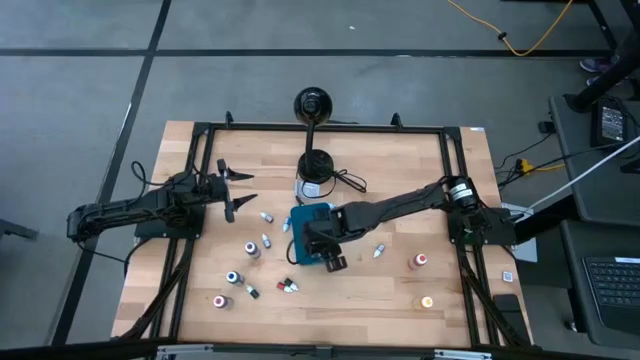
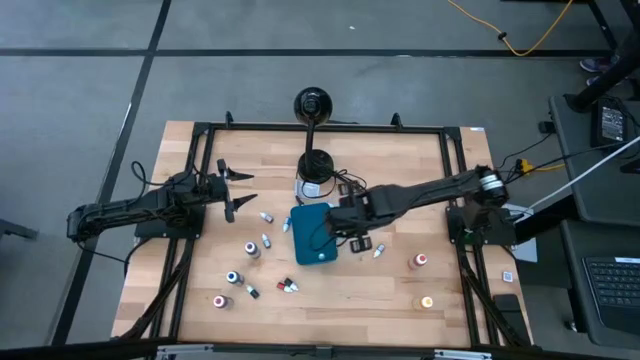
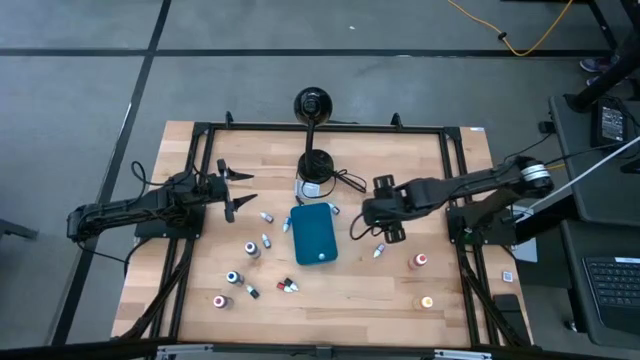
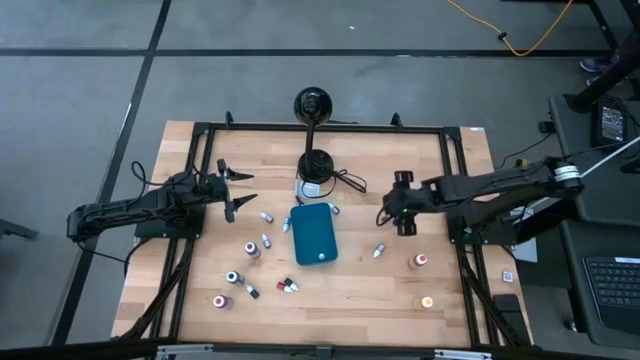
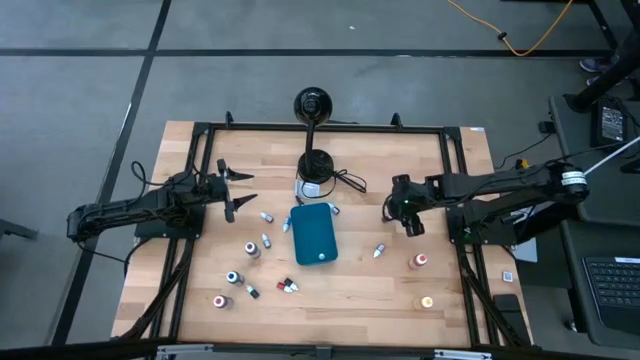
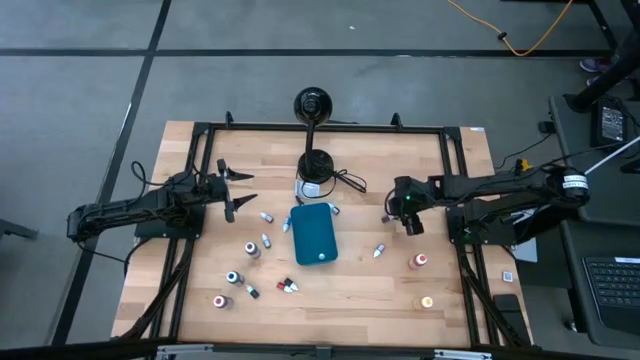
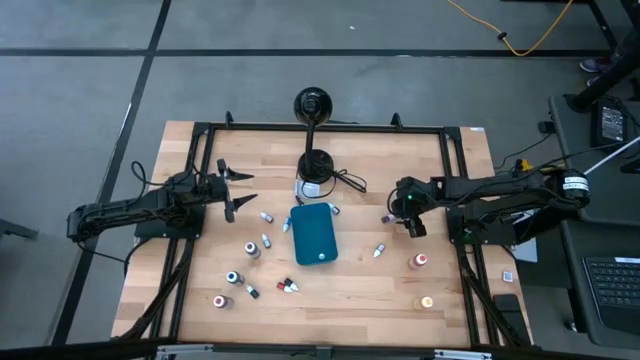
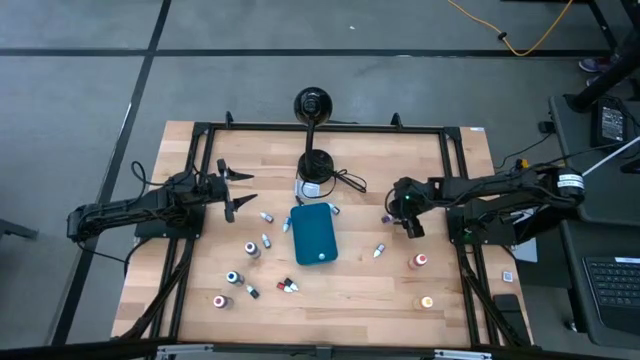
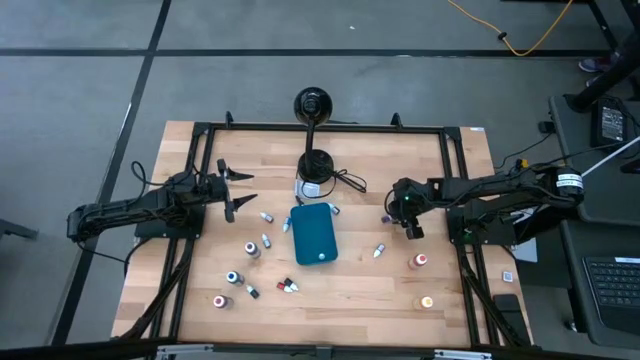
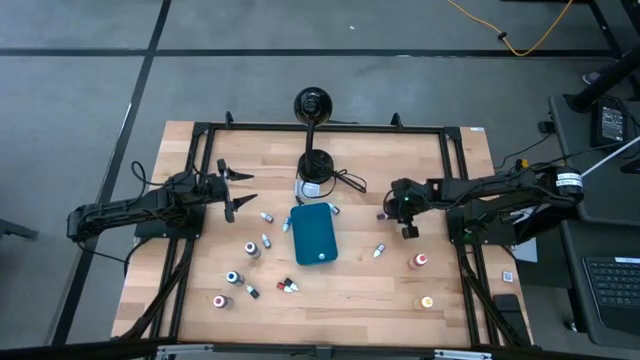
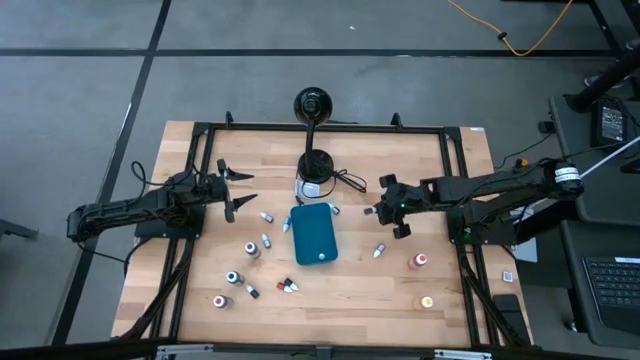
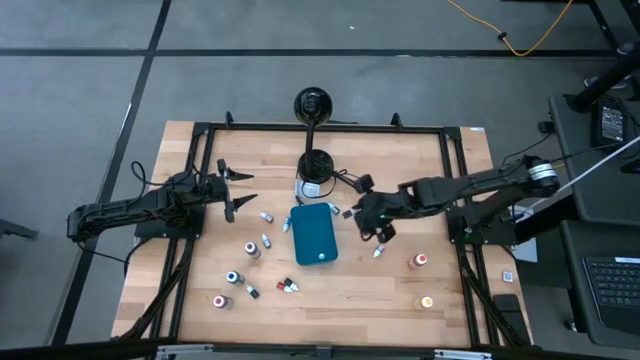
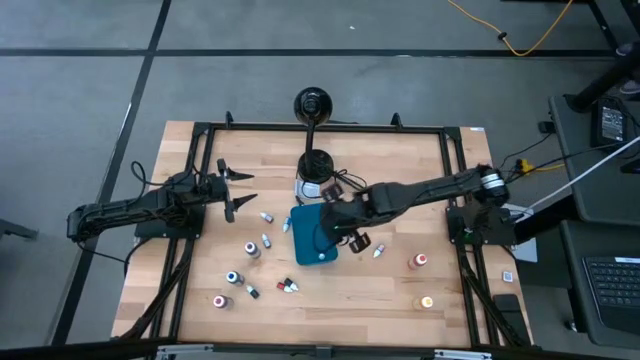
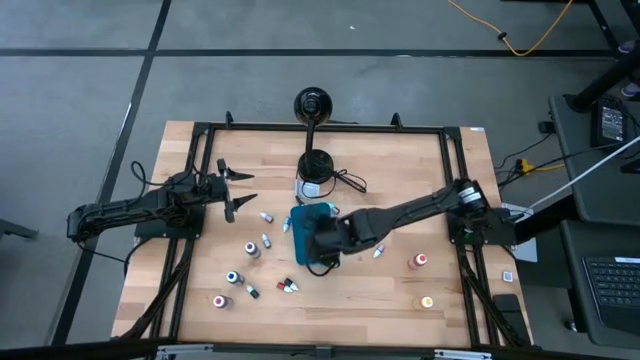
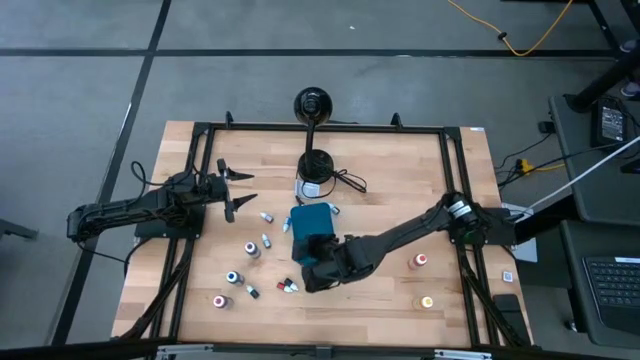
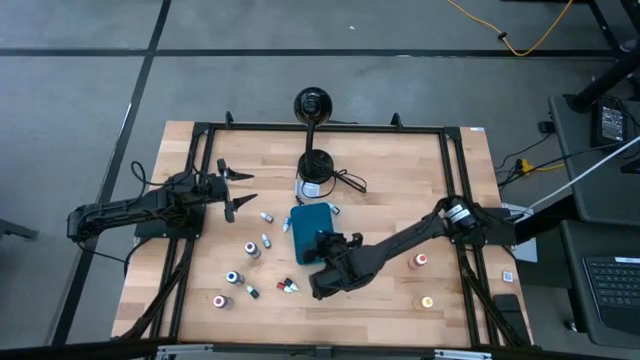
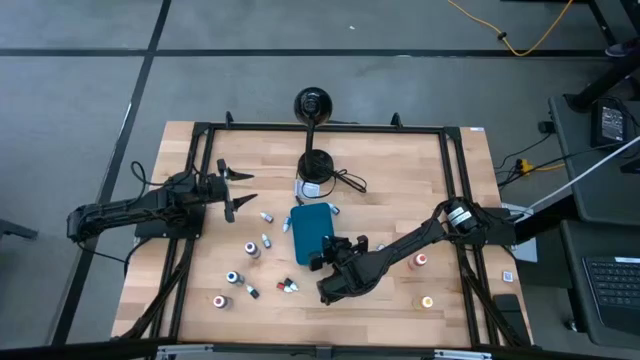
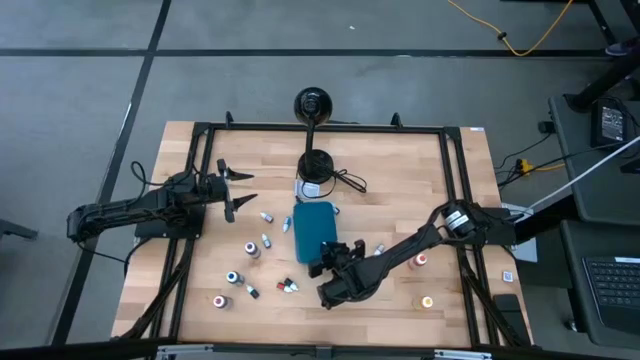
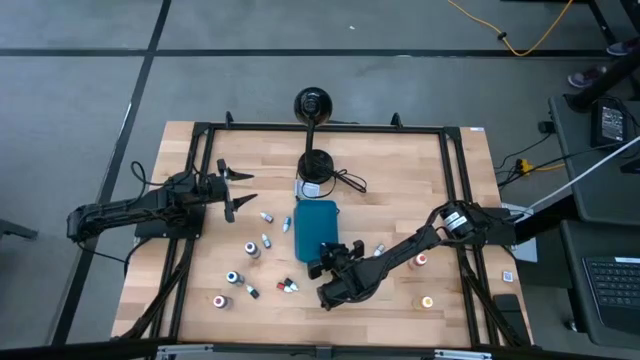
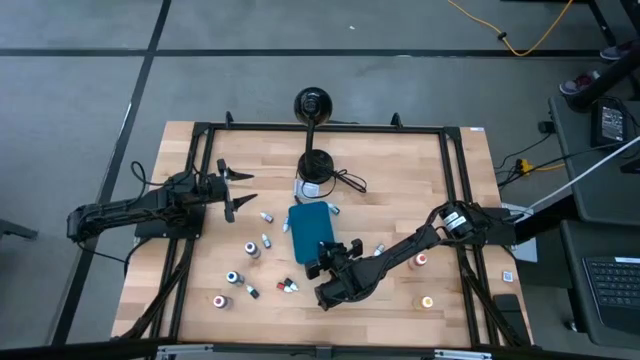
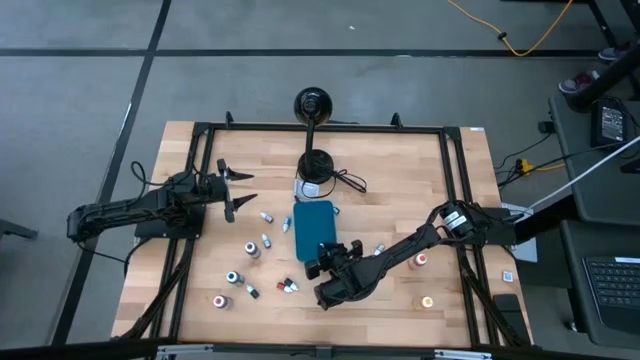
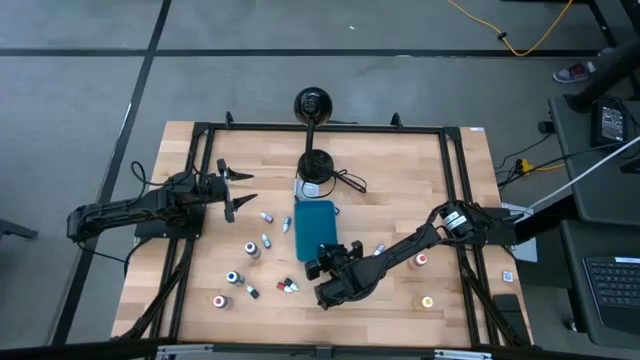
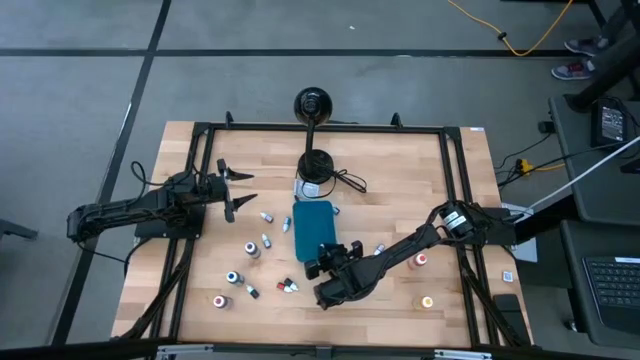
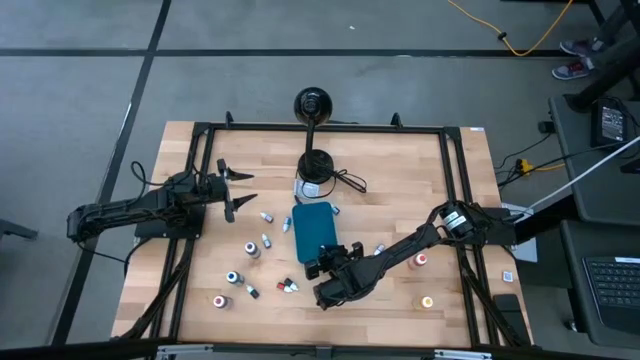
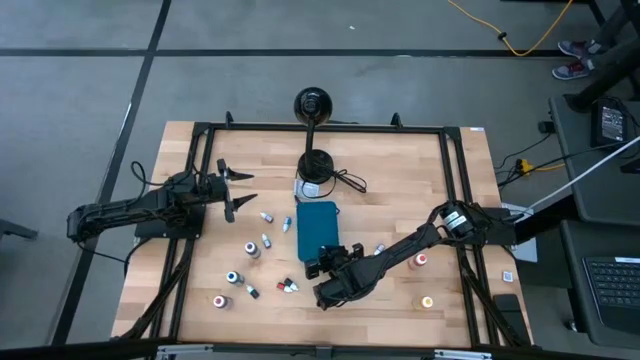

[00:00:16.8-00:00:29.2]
Task: Pick & Place food coloring
Put the purple small food coloring bottle into the bin

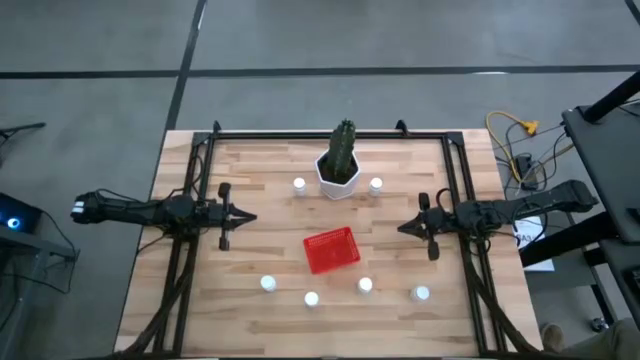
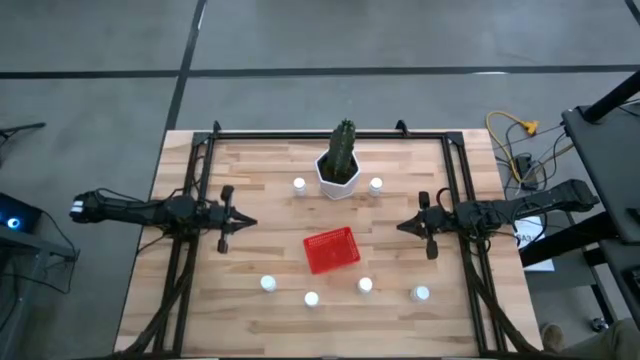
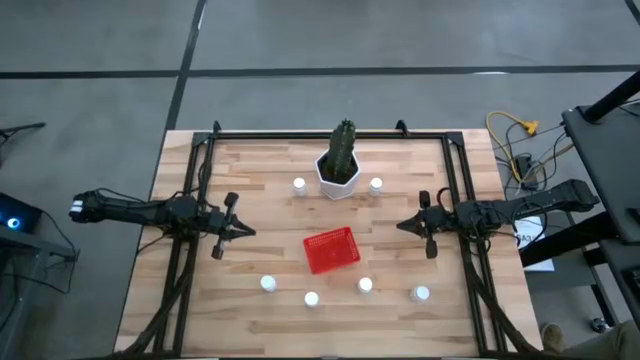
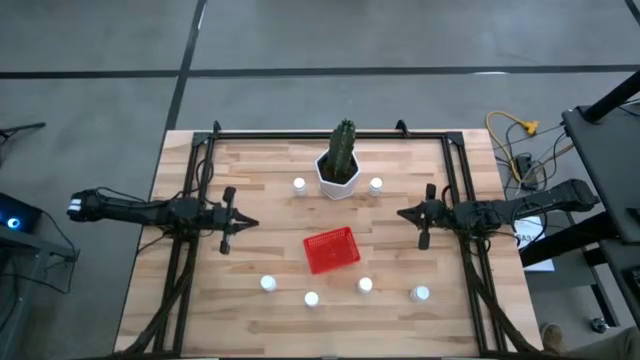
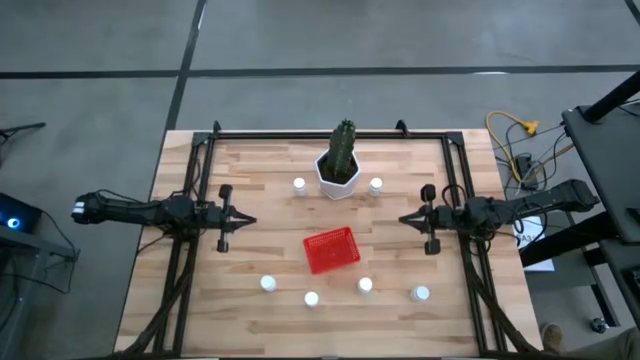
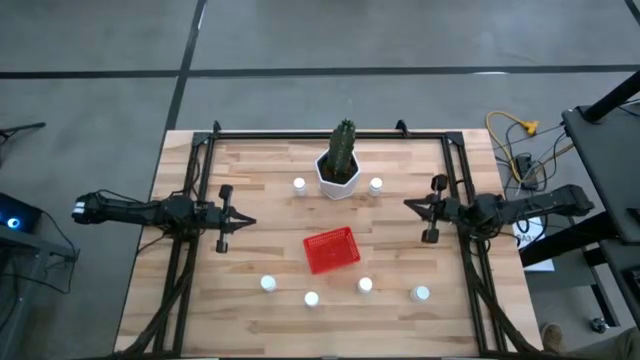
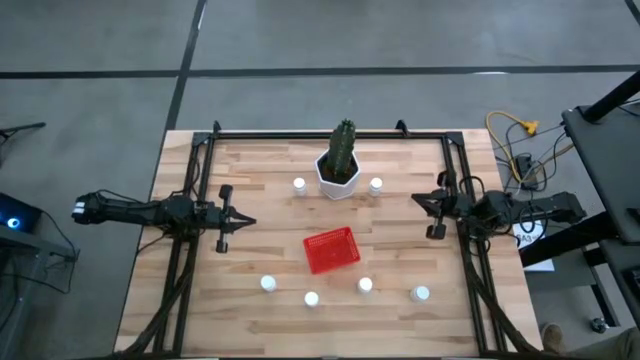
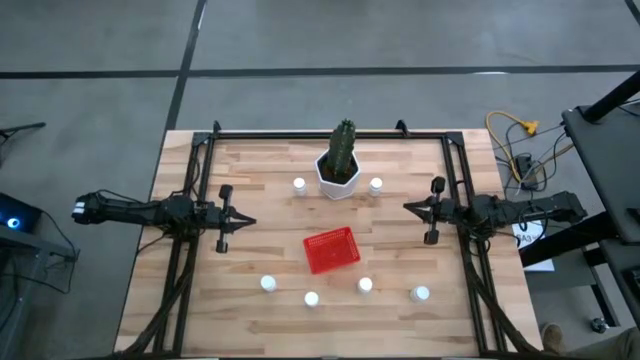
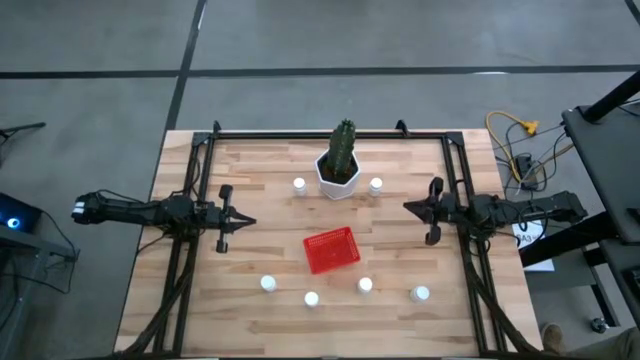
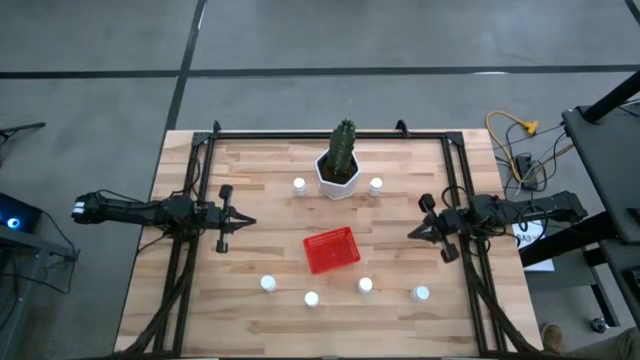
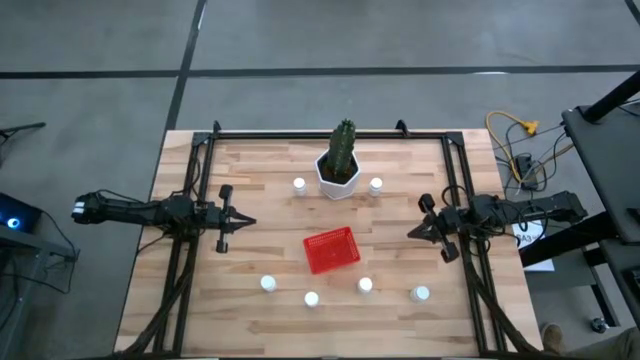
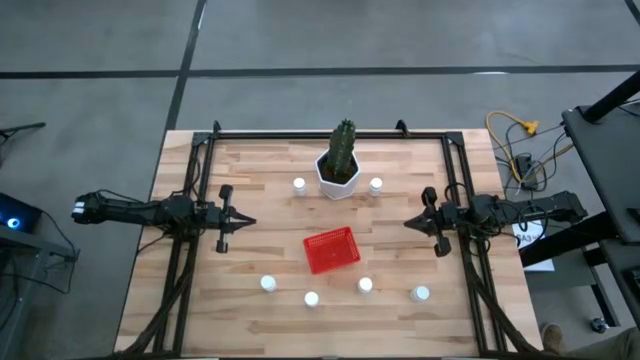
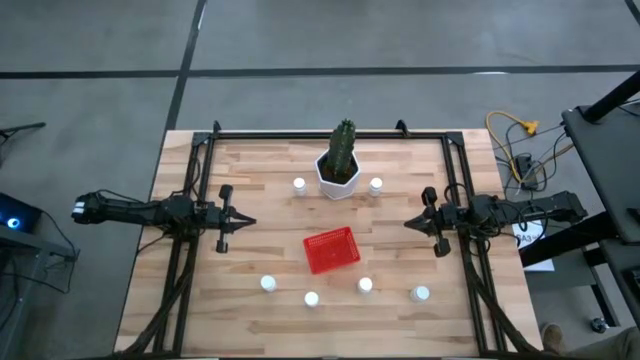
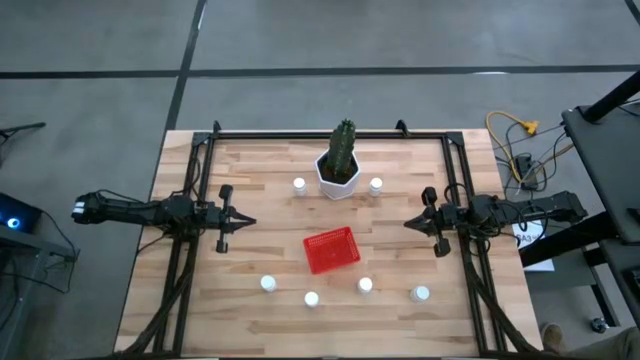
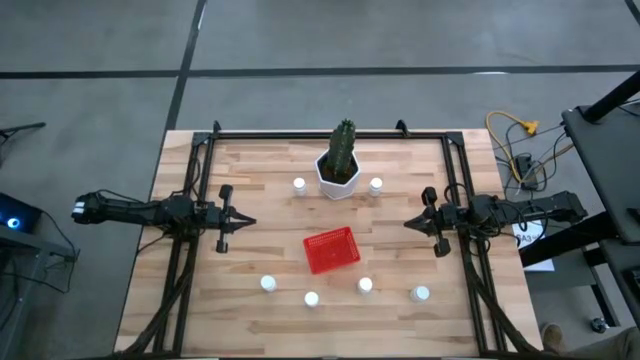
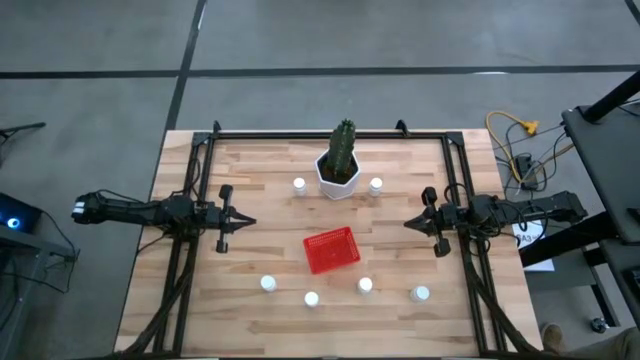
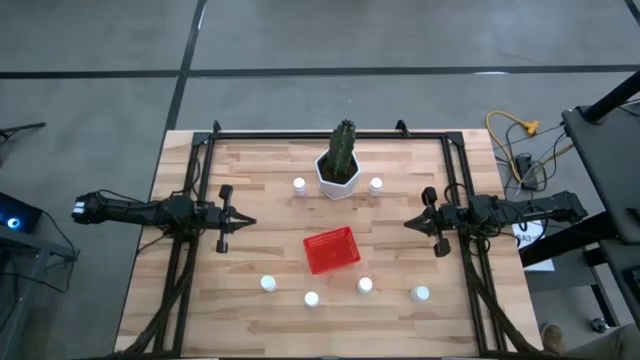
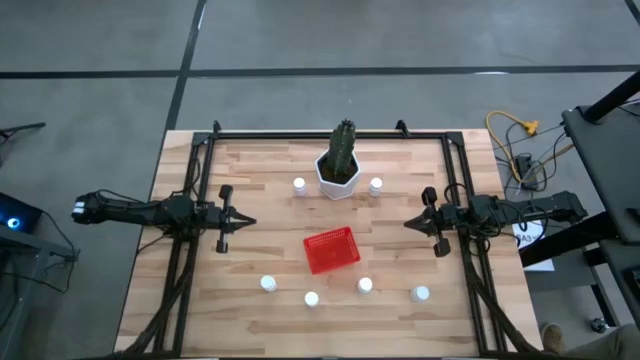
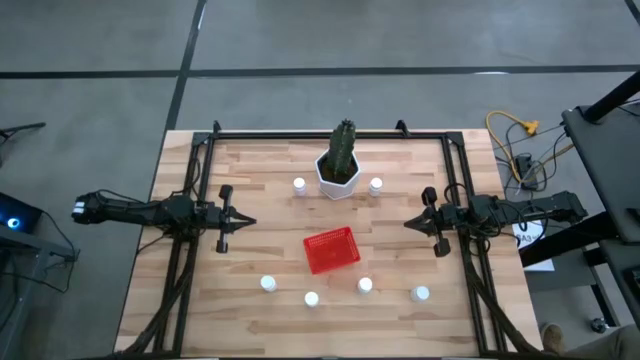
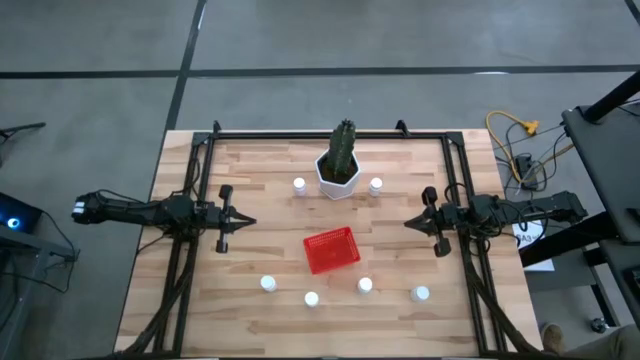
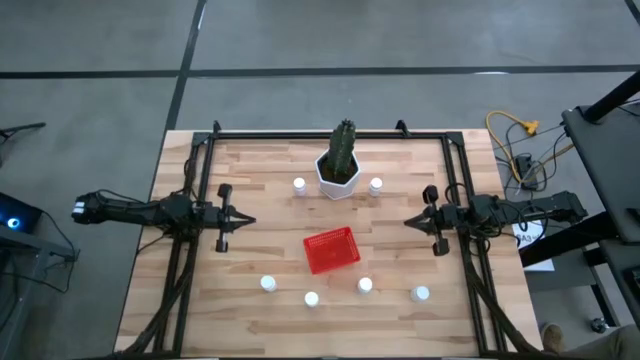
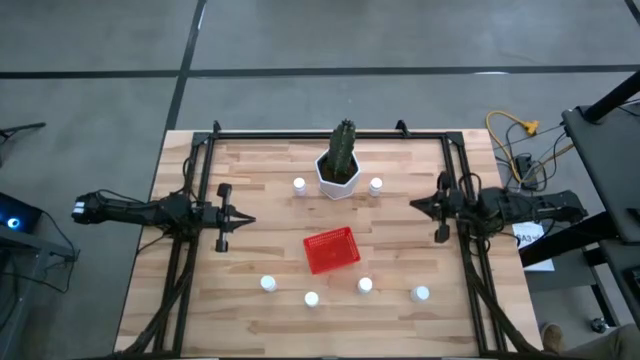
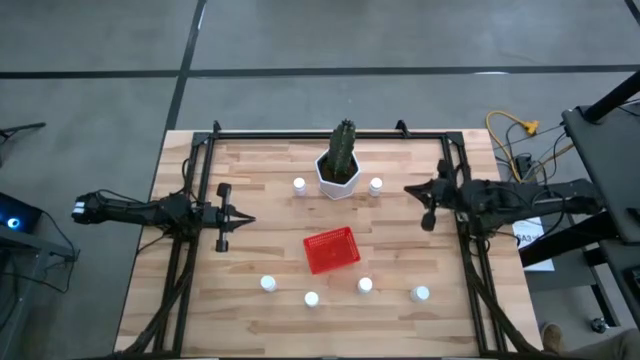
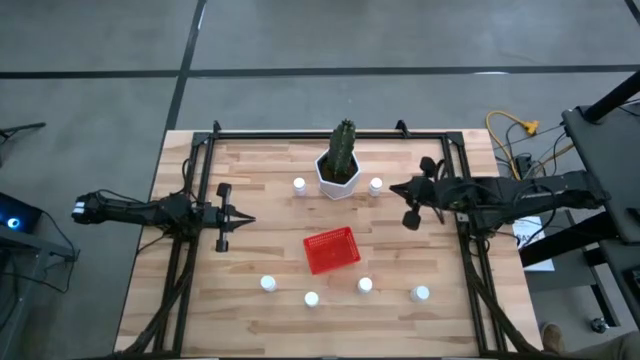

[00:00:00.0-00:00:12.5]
Task: Pick and place pill bottles into a basket
Put the white pill bottle into the red bin
